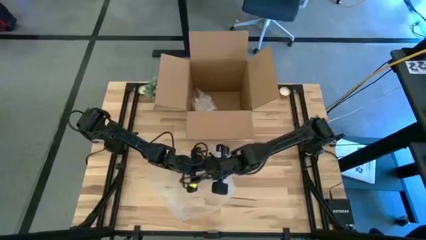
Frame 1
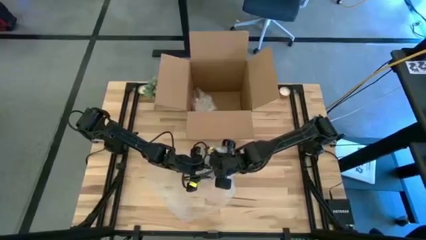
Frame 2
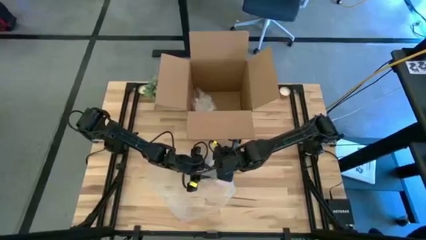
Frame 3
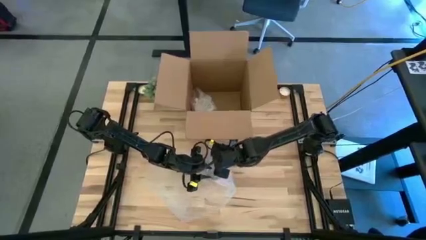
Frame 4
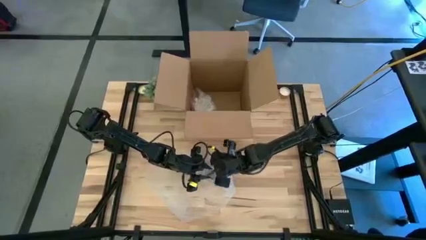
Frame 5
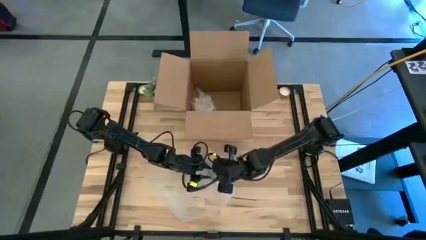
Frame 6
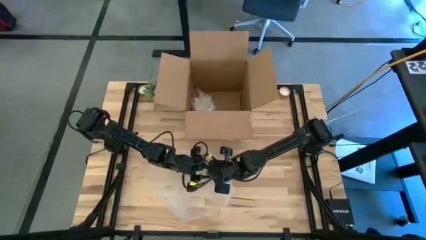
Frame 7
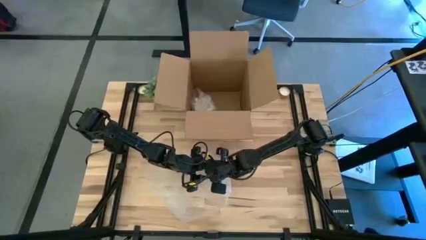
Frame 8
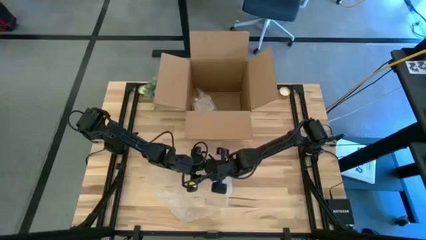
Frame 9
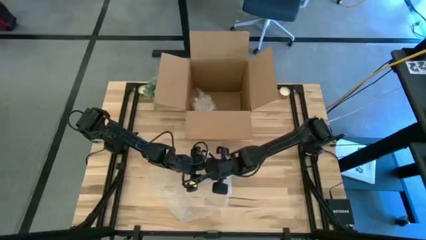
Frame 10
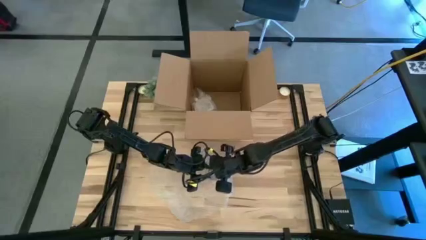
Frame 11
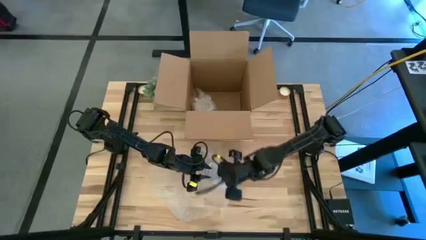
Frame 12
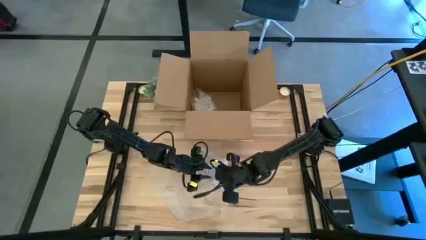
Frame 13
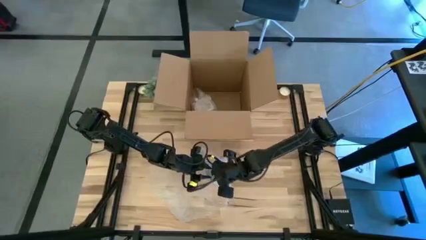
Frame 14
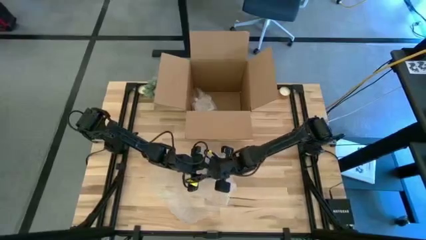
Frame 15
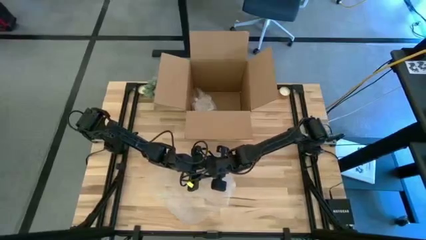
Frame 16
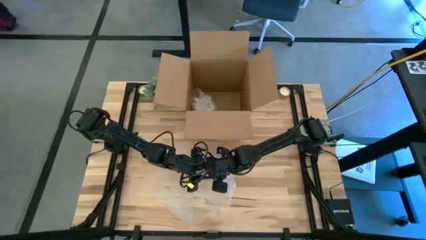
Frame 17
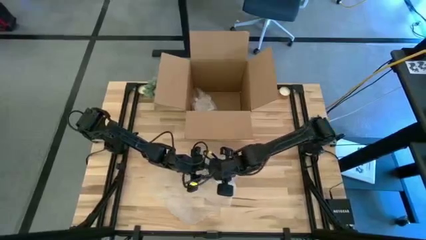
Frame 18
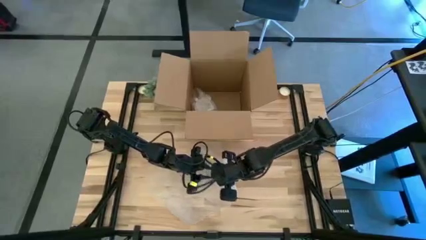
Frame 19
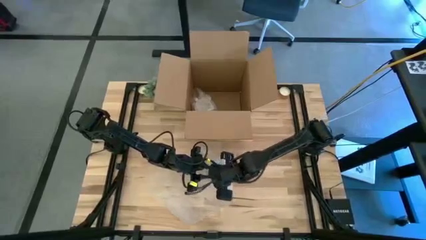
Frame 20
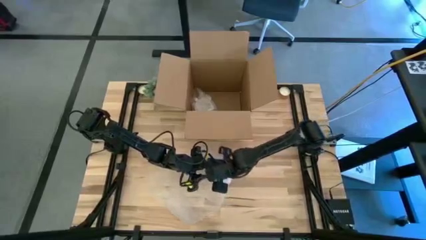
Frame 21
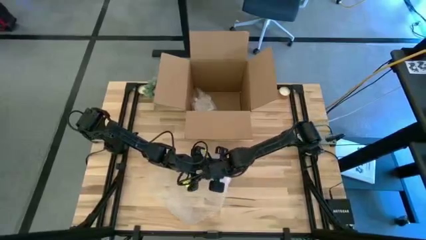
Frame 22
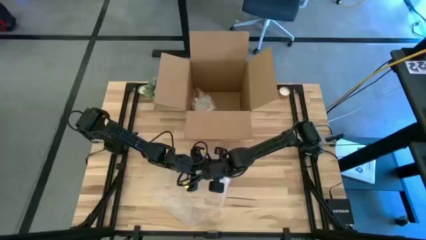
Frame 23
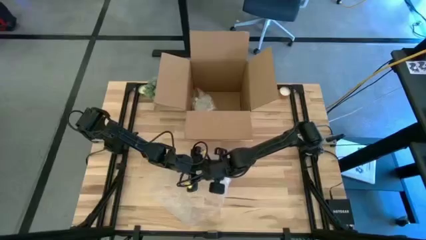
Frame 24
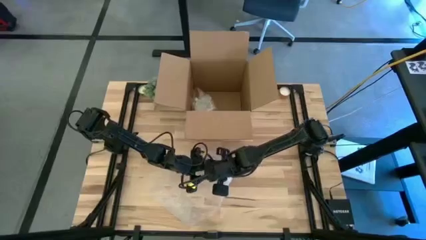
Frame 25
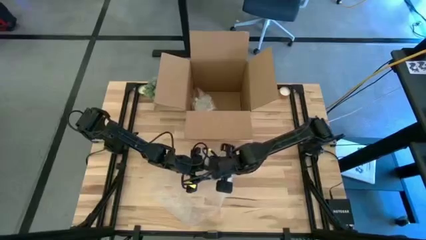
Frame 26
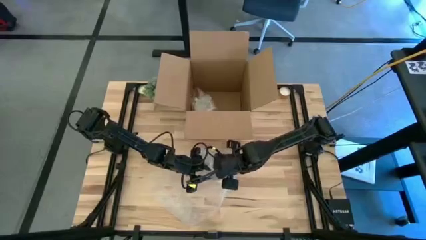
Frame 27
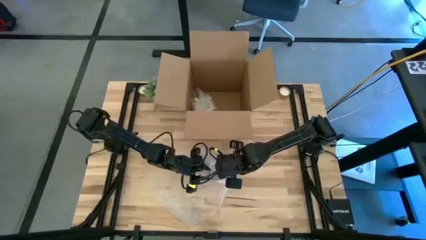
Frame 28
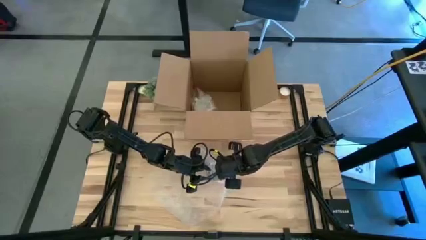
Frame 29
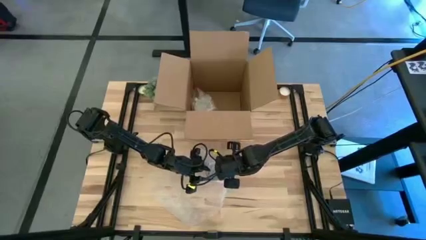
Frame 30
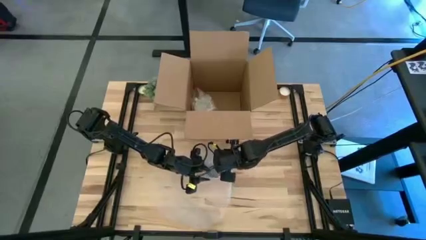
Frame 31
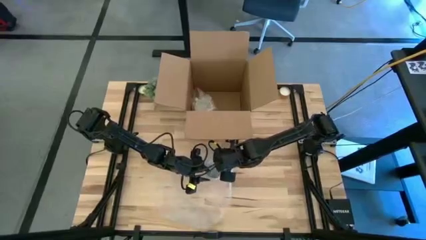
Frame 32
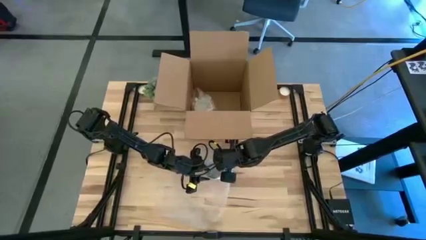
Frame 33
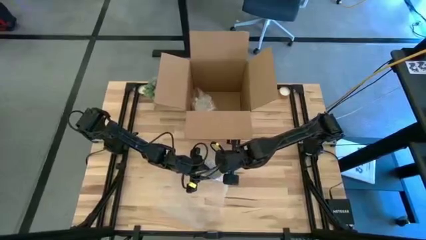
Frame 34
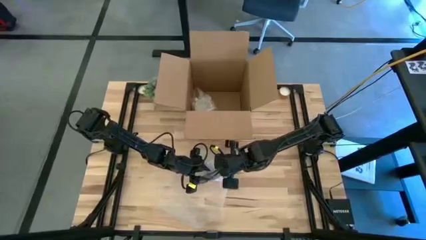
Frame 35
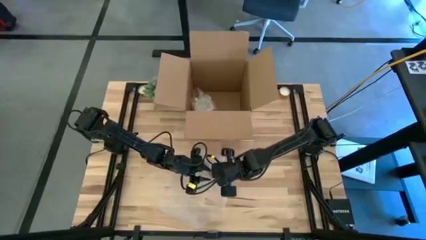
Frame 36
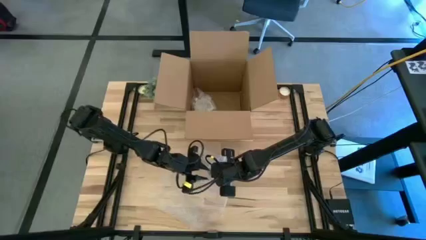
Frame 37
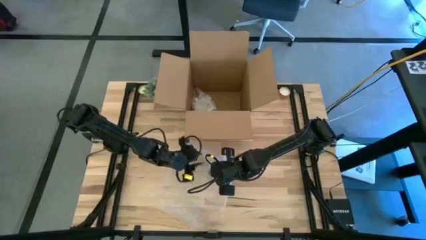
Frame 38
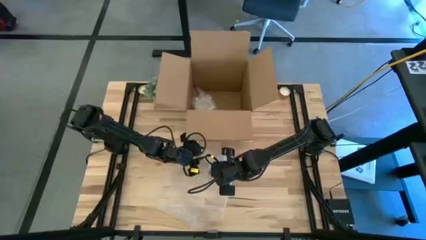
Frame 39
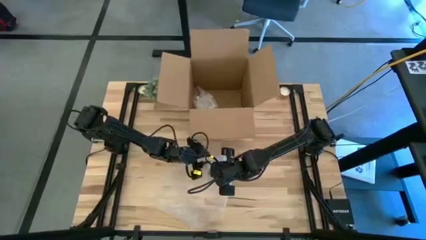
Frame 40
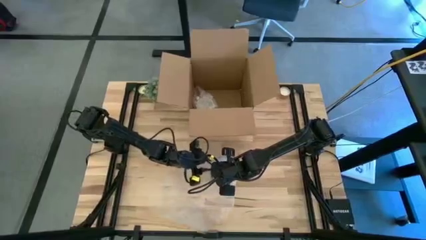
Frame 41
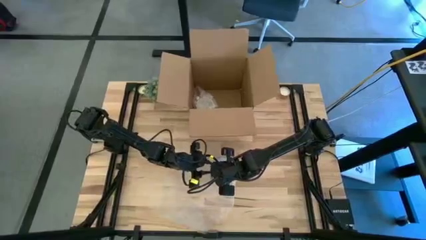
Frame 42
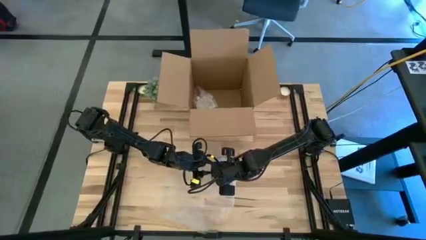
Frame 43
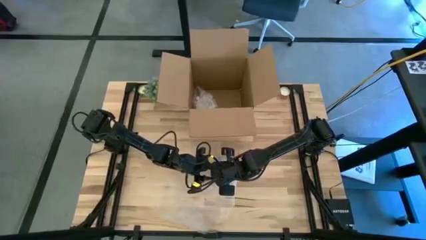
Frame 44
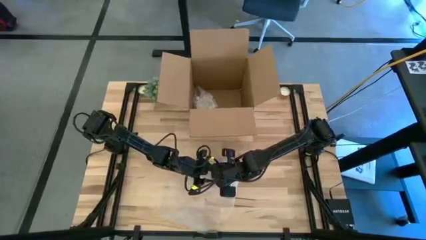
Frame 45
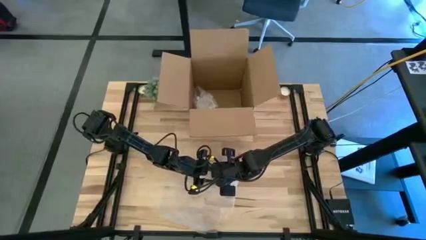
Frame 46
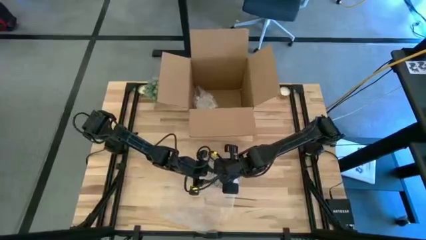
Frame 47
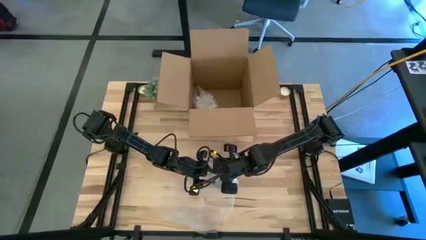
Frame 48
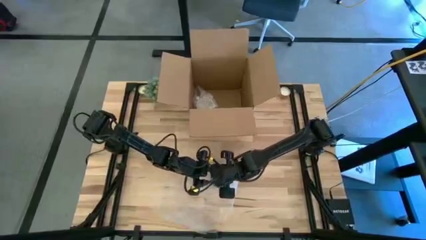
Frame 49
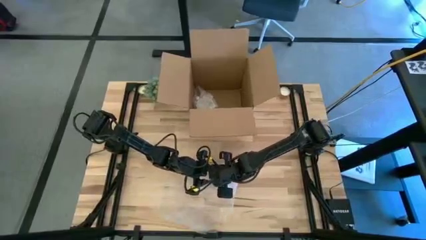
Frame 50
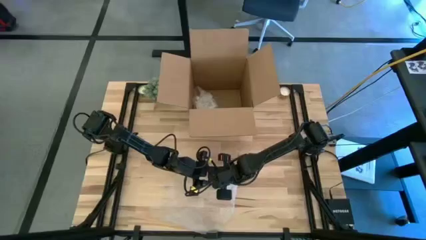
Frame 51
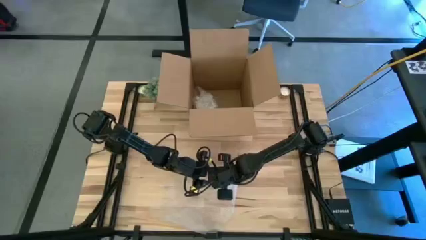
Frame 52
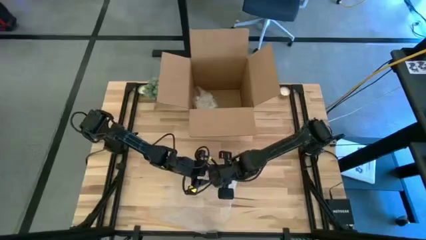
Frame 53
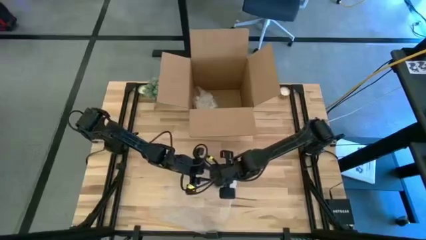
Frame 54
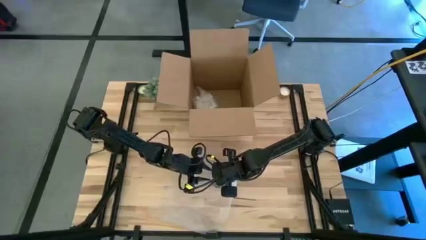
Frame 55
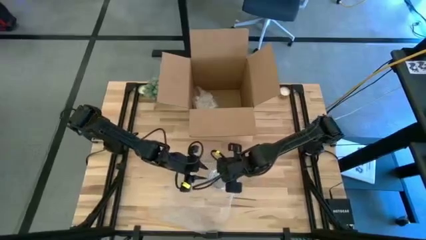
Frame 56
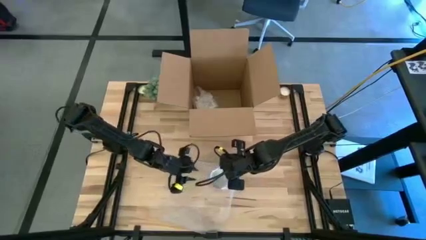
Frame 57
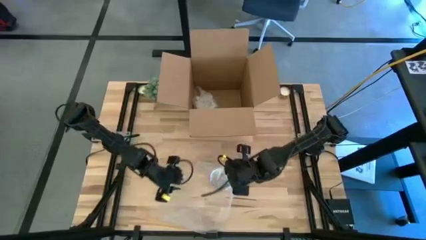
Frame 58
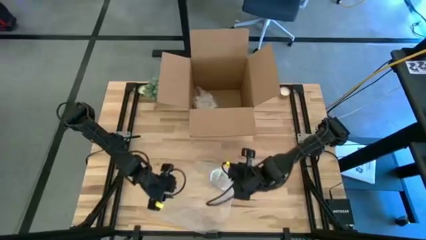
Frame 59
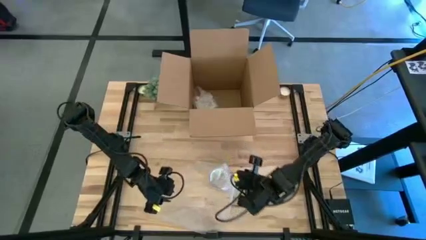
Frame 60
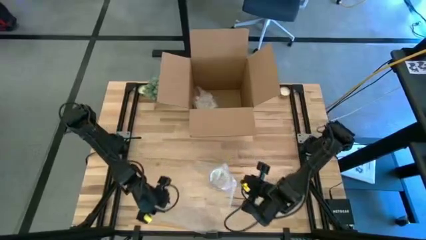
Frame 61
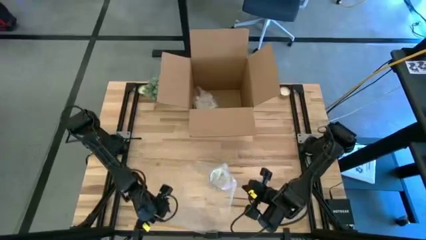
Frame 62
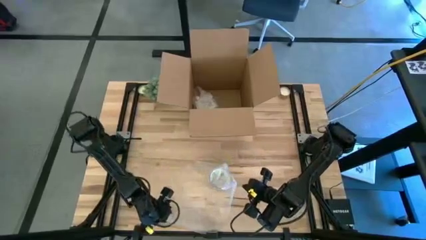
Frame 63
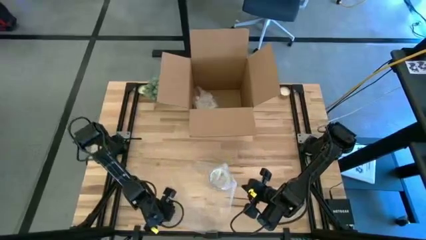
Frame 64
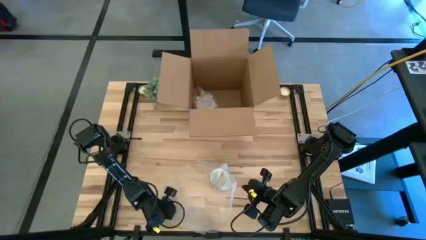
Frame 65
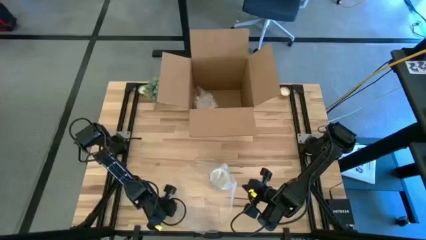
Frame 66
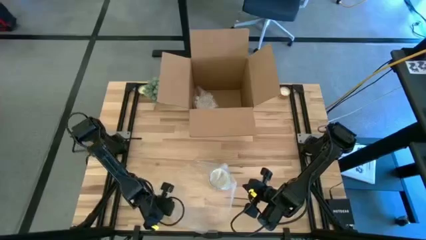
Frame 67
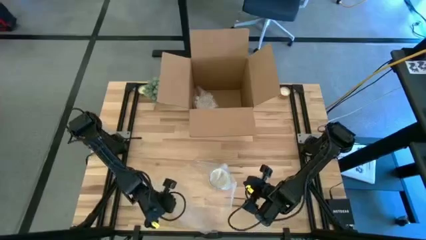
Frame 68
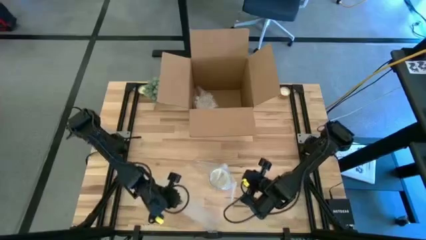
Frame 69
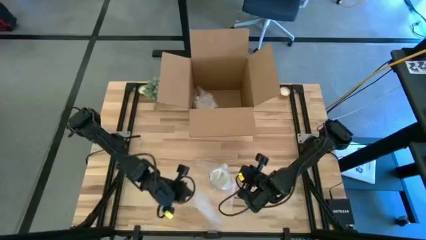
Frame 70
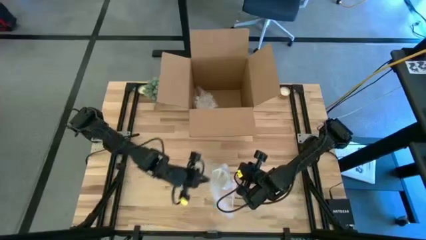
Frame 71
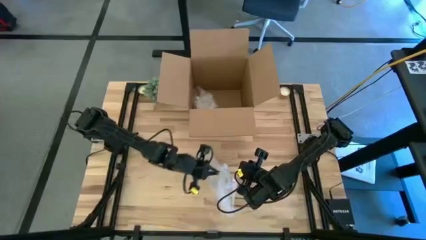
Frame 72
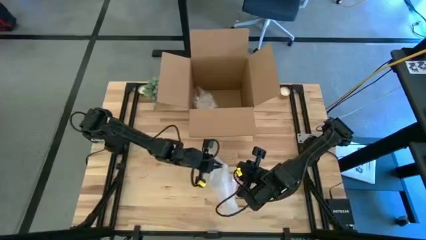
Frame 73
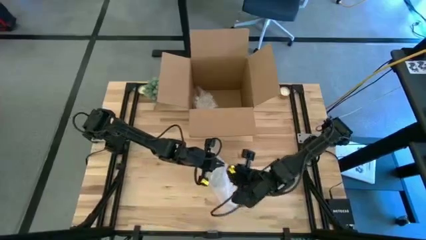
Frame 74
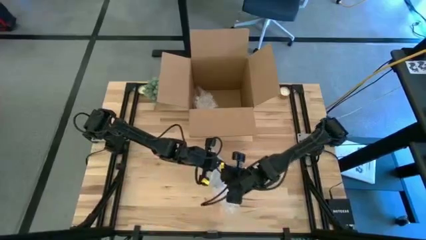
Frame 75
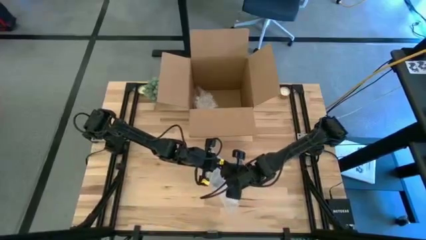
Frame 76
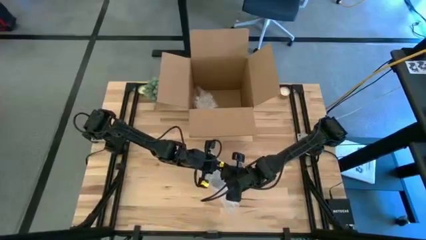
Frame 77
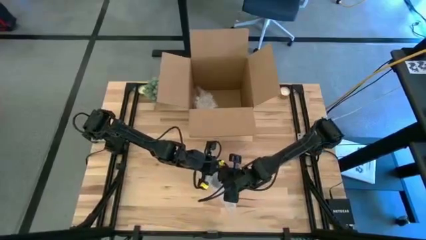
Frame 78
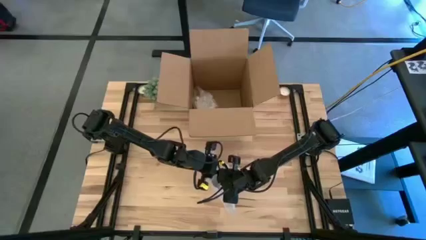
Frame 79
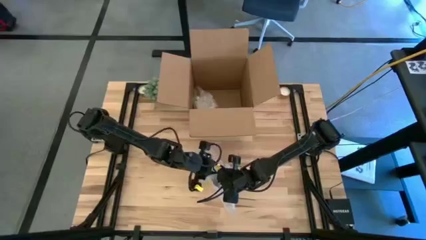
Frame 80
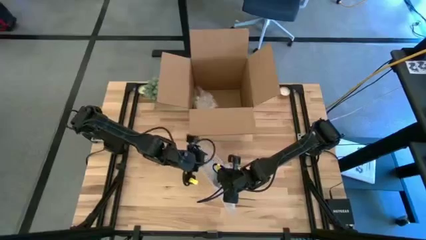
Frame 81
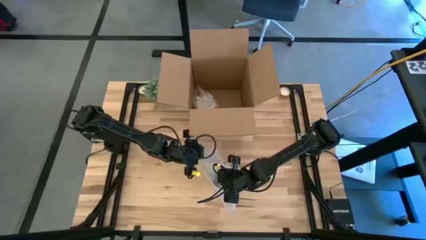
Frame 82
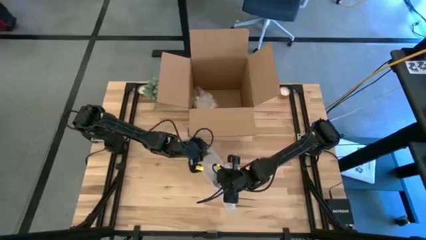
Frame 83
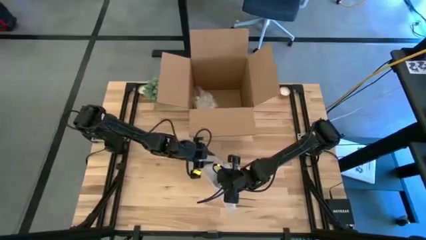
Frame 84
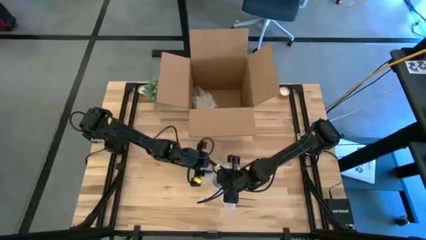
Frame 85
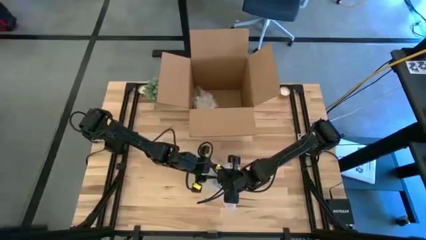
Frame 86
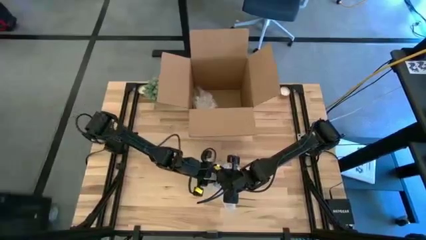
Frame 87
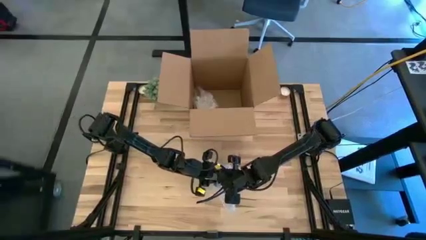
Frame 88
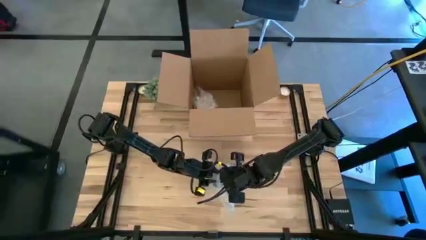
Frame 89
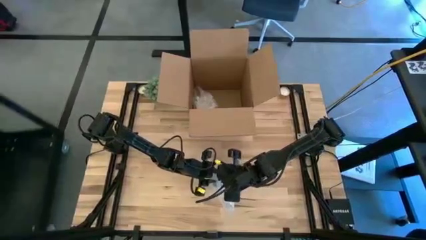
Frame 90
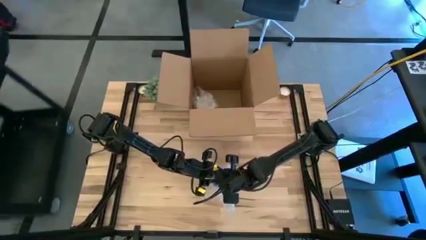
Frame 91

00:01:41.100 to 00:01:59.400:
Task: wrap mug
Wrap the red mug with the bubble wrap
